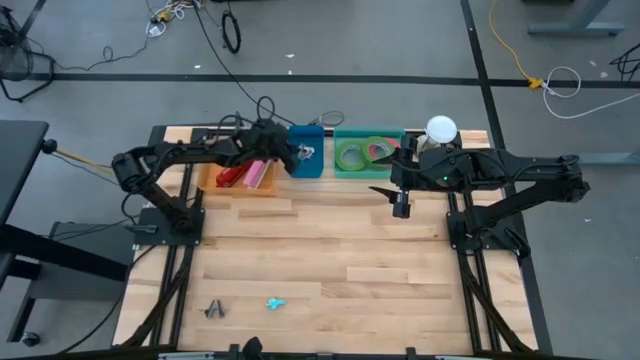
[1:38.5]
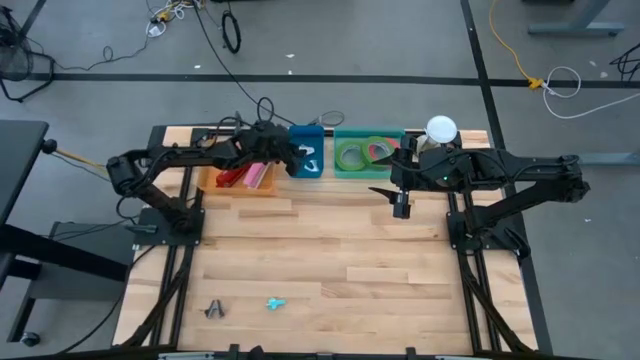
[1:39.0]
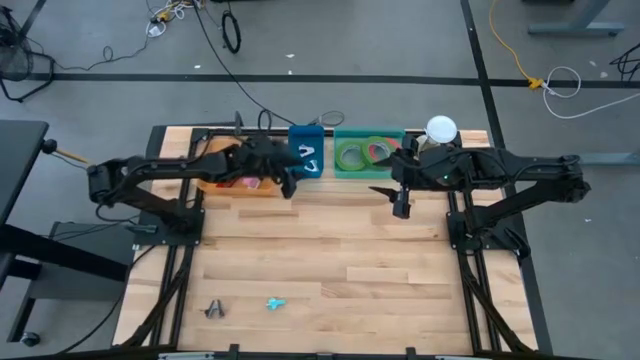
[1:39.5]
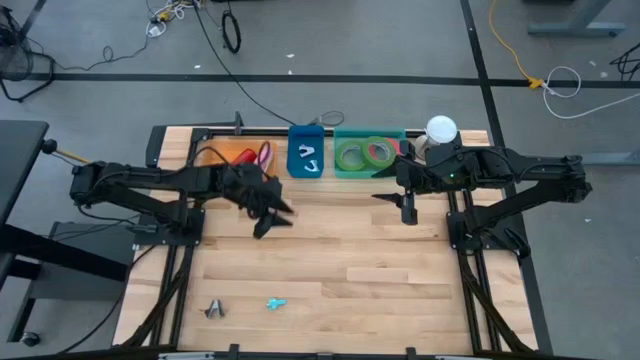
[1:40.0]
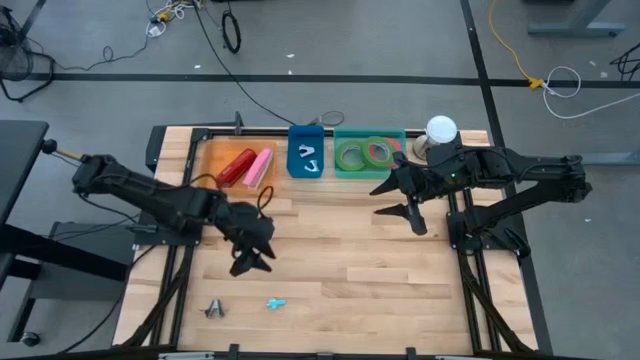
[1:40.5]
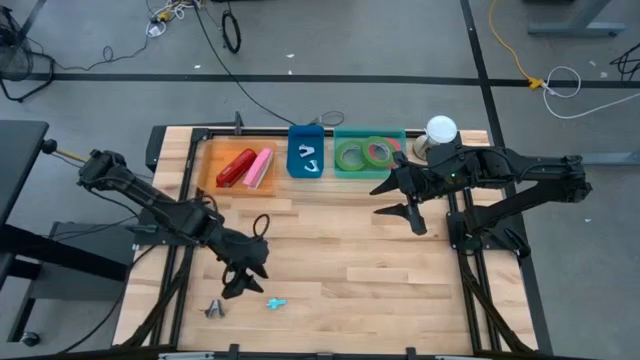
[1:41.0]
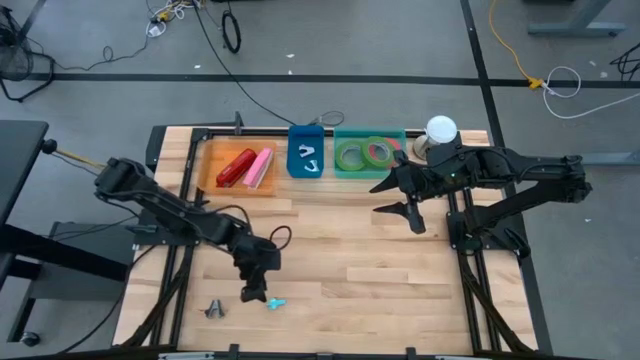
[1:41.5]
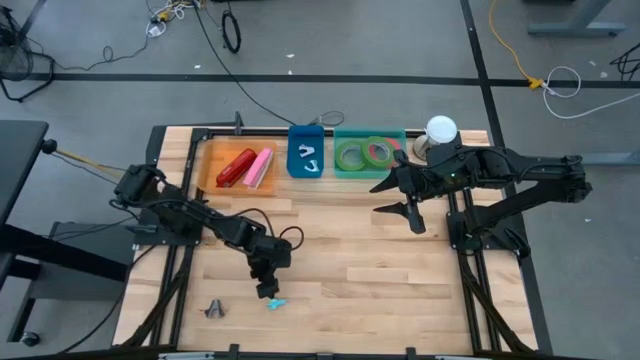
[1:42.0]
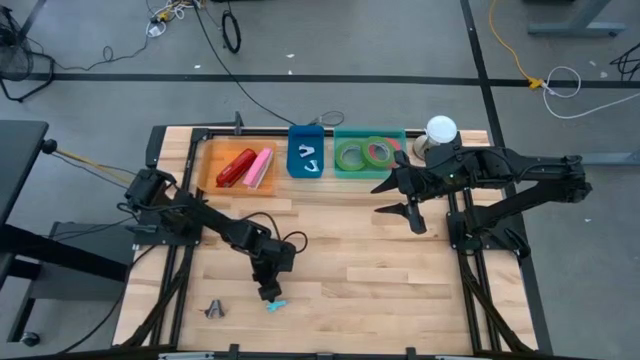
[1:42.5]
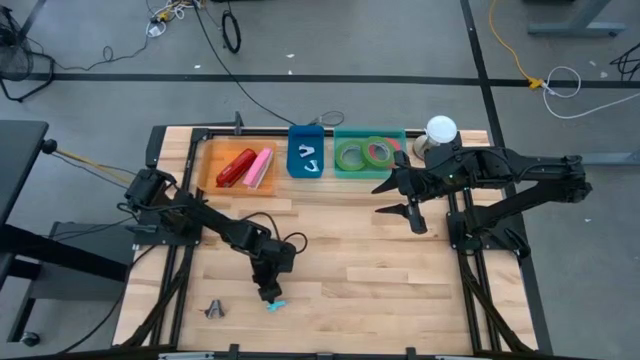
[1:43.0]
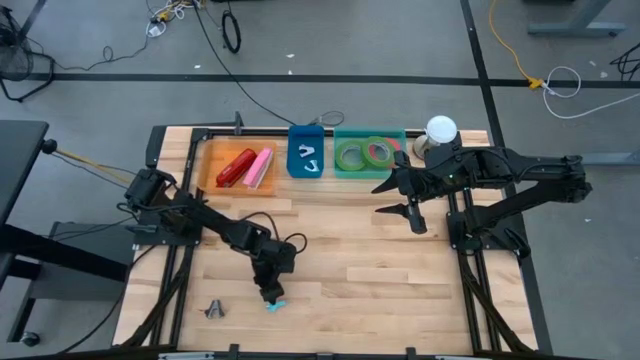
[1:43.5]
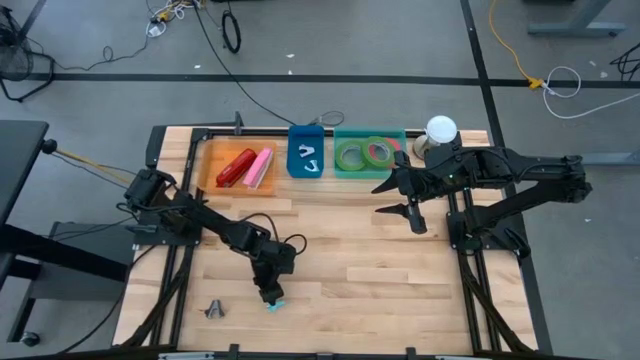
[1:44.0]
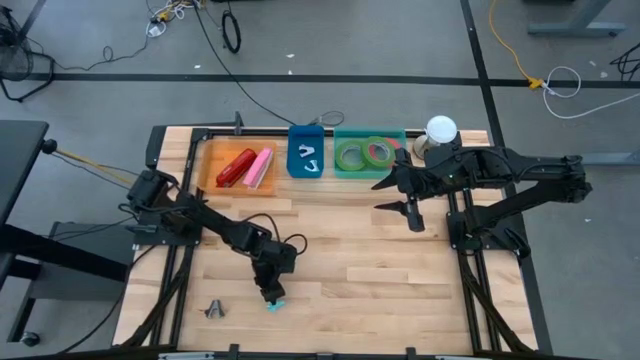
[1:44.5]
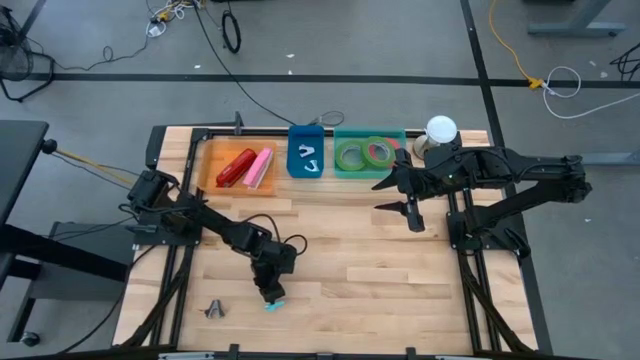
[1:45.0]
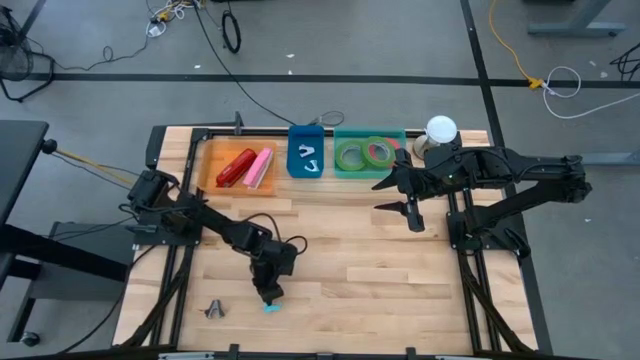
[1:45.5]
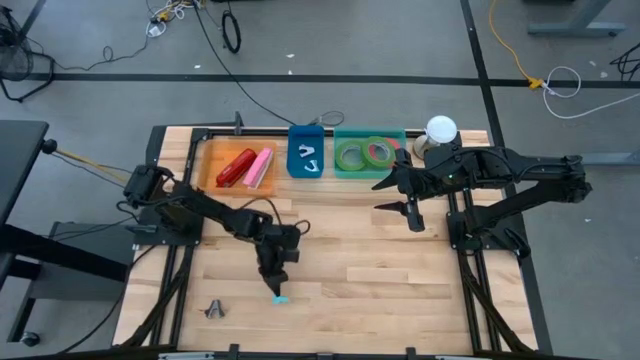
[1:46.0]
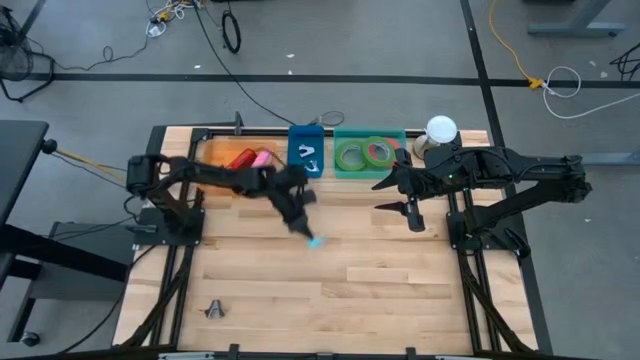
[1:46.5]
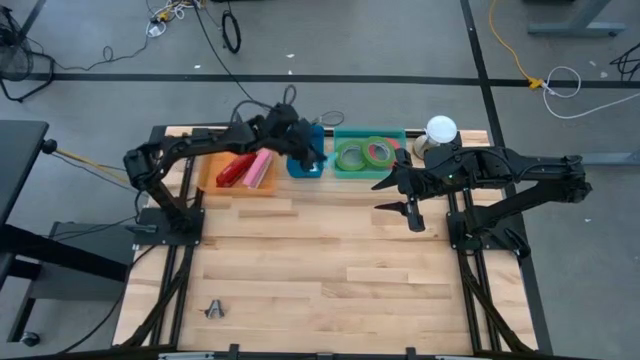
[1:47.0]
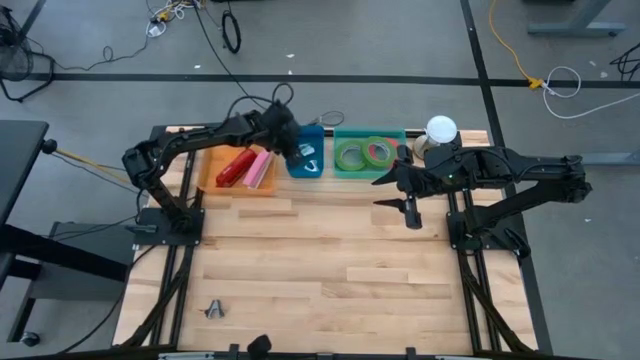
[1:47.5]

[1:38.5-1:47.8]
Task: Pick and place Stapler, Stapler remover, tape
Put the light blue staple remover into the blue bin

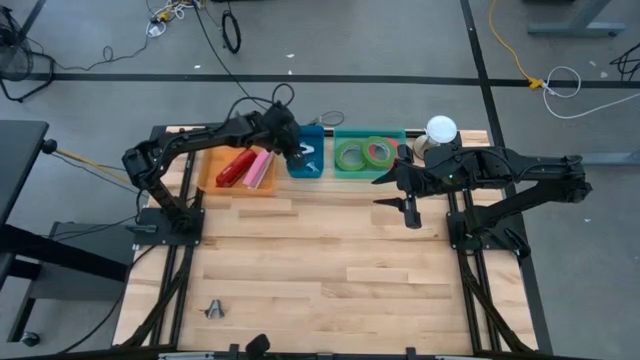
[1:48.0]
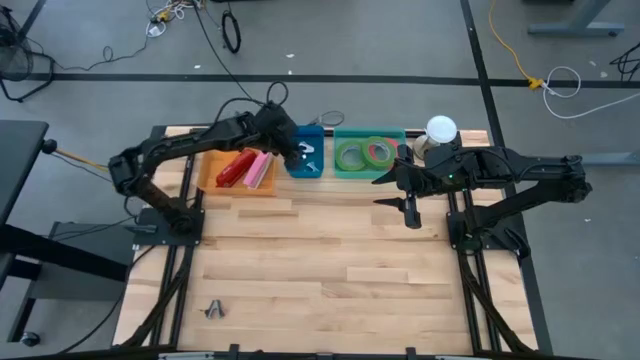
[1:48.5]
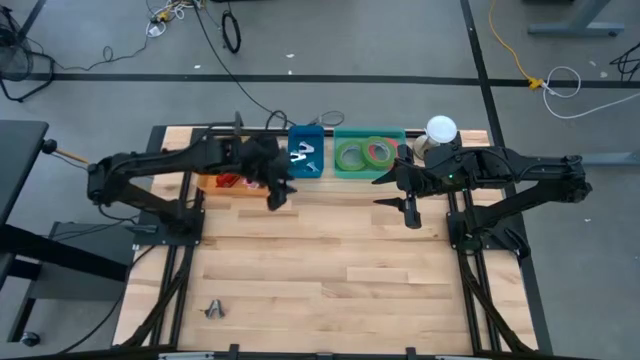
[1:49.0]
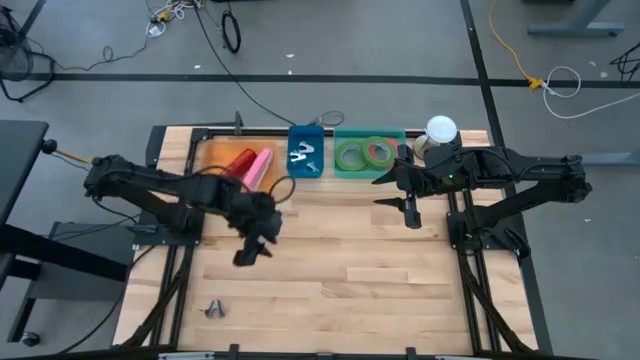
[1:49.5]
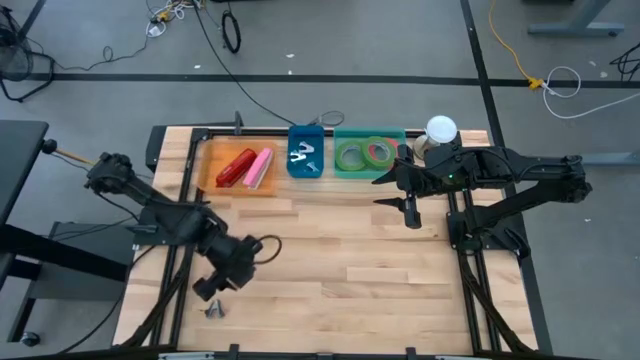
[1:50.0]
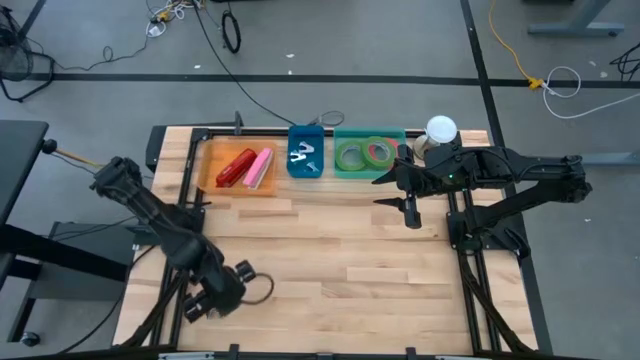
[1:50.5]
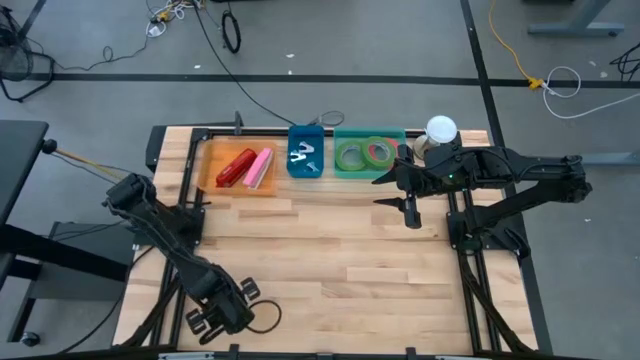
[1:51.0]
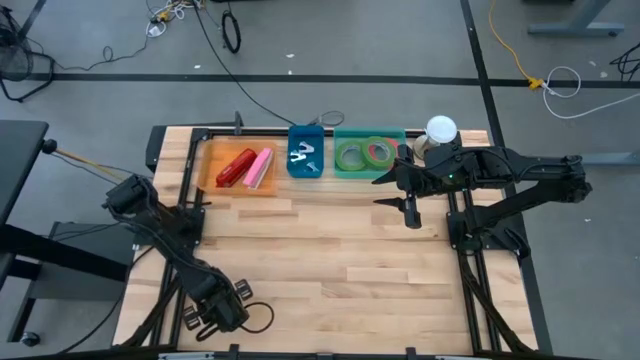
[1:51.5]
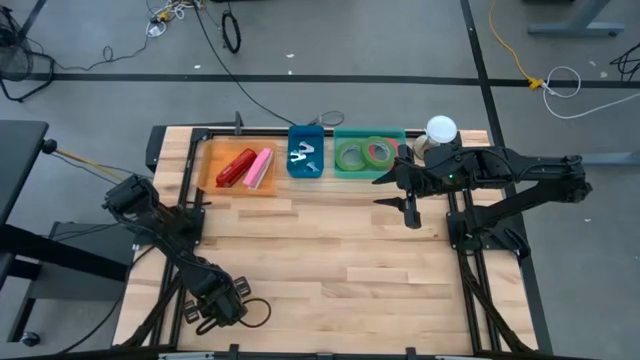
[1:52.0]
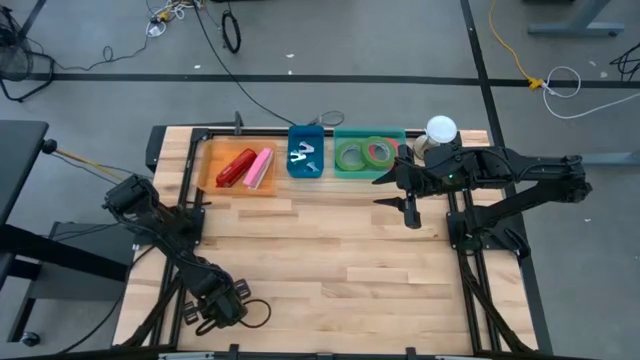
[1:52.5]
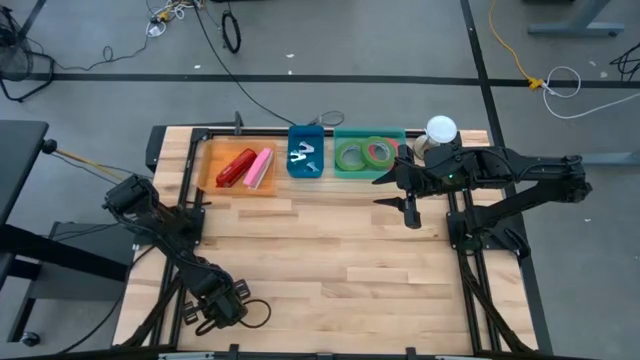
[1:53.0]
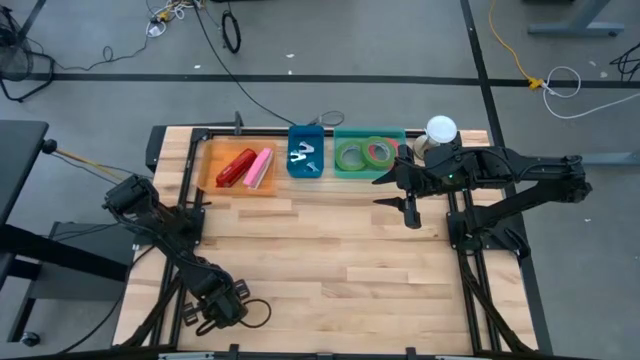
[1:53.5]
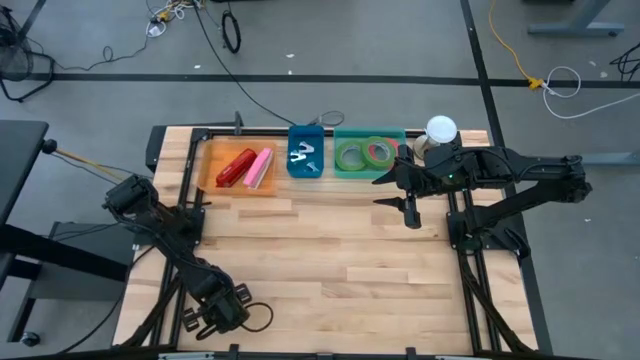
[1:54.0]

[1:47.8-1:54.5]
Put the black staple remover into the blue bin

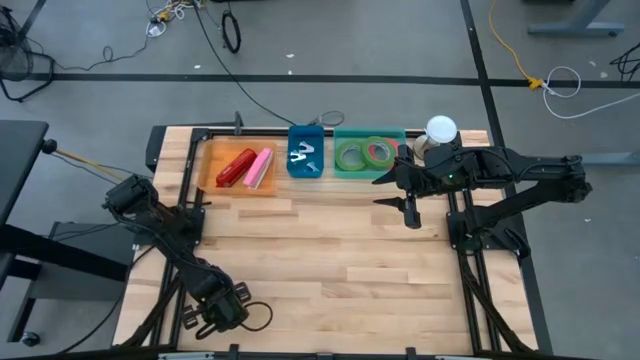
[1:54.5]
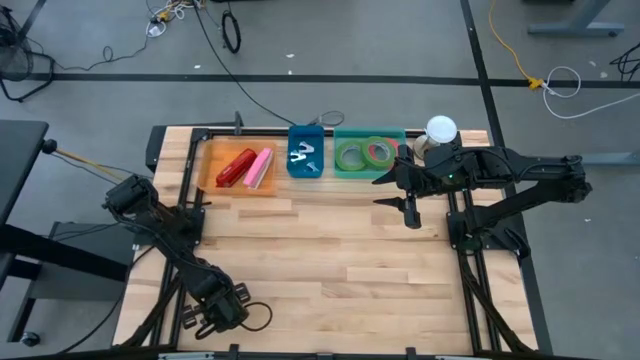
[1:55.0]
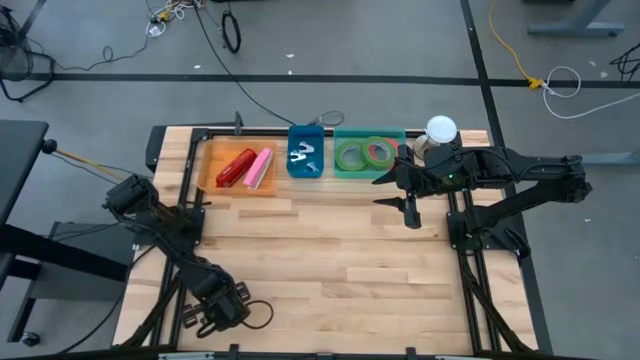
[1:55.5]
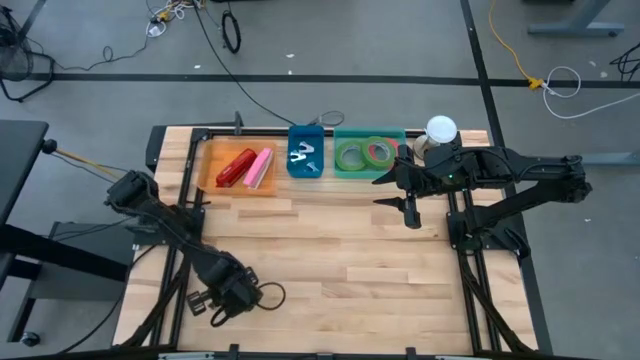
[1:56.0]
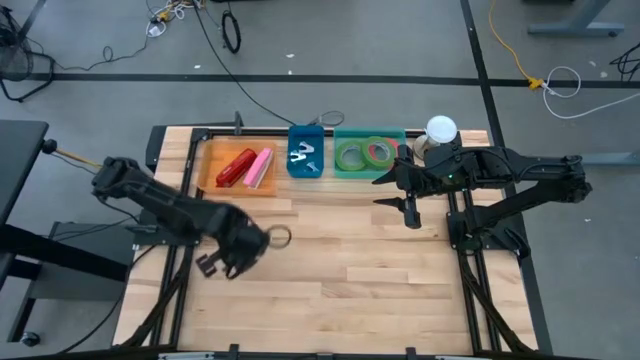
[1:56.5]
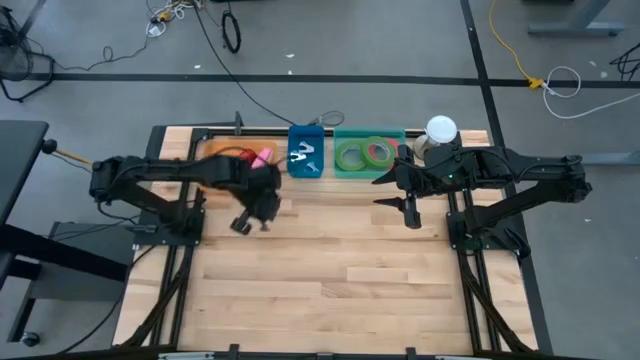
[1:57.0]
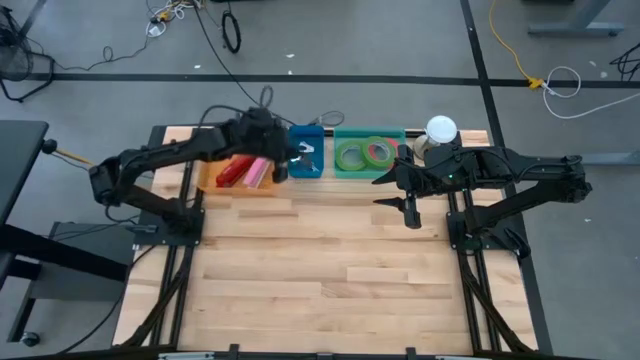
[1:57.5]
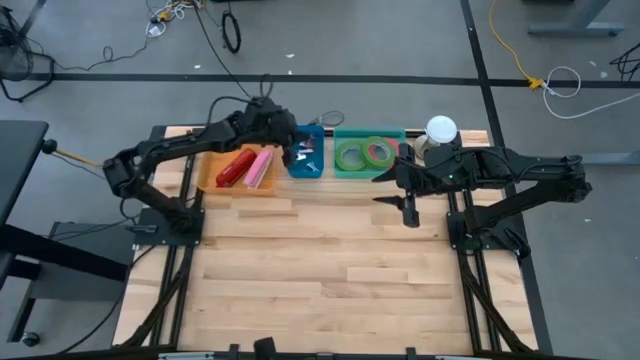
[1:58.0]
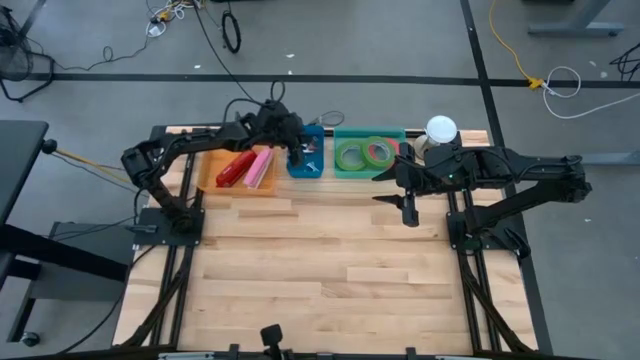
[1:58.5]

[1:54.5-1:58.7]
Put the black staple remover into the blue bin
